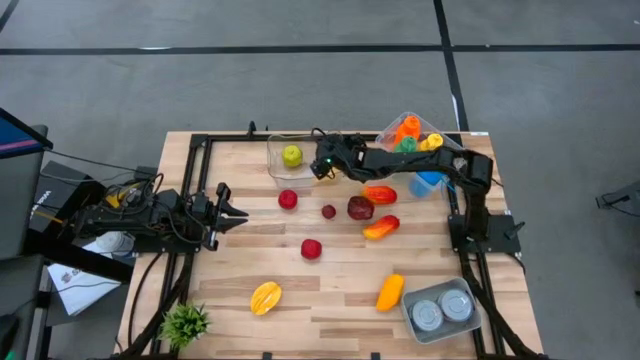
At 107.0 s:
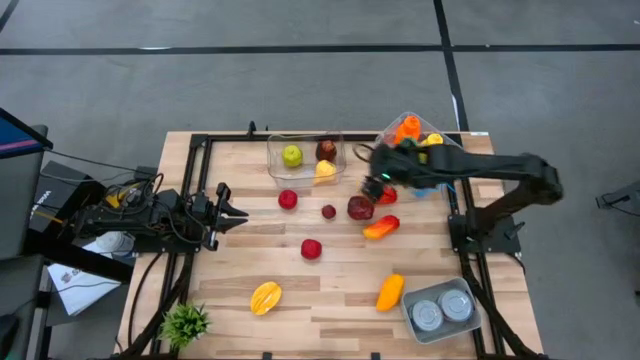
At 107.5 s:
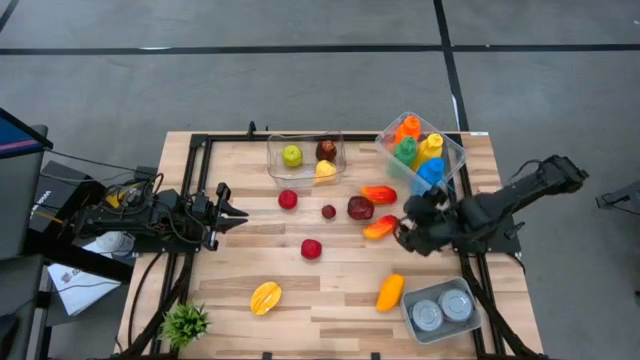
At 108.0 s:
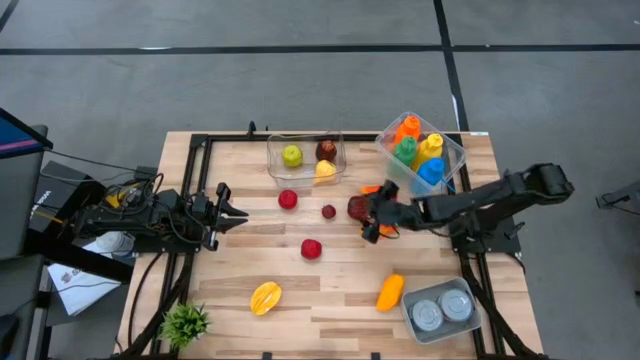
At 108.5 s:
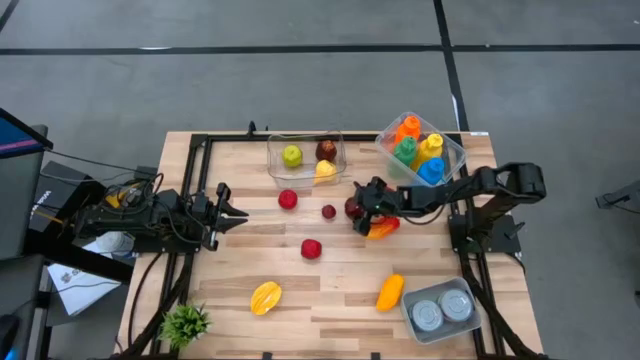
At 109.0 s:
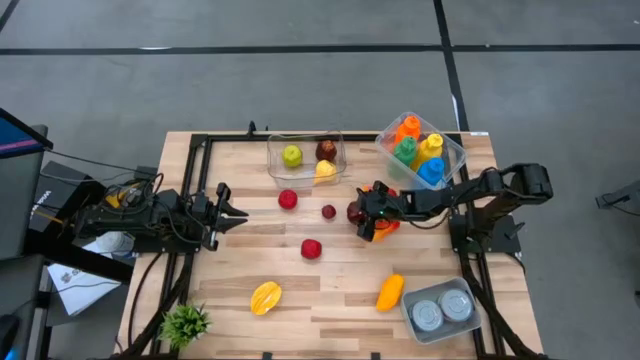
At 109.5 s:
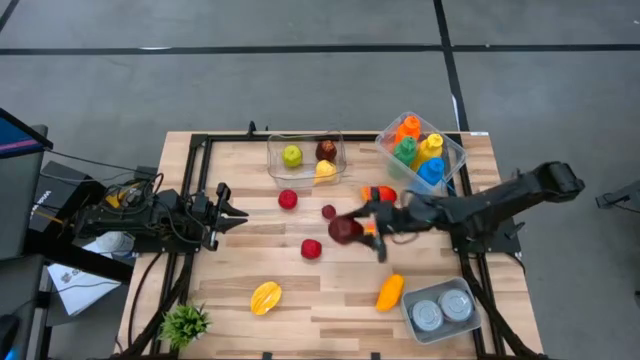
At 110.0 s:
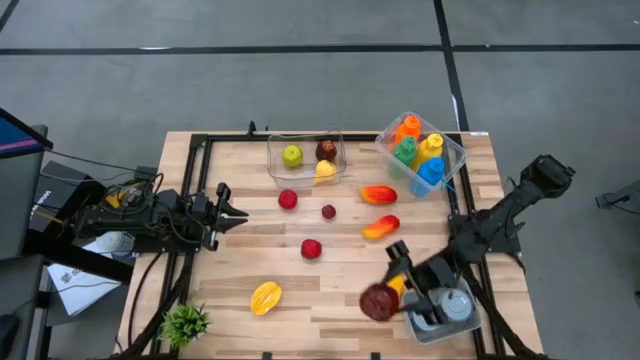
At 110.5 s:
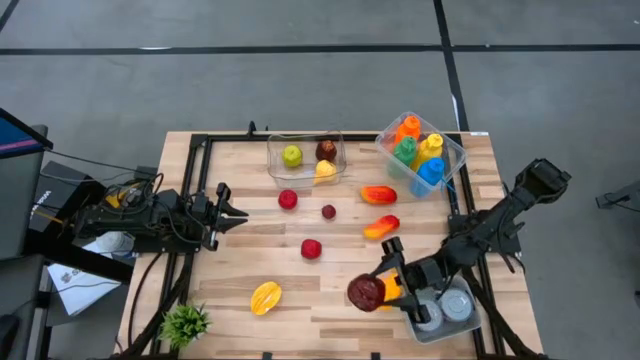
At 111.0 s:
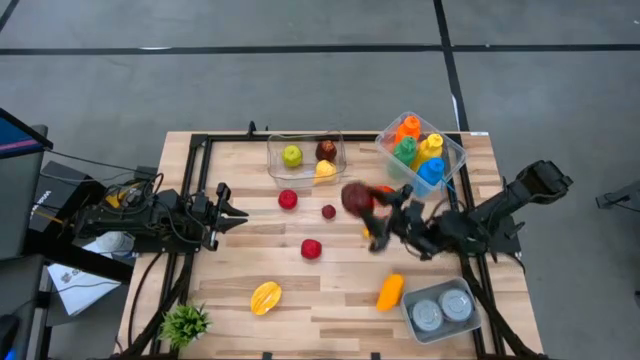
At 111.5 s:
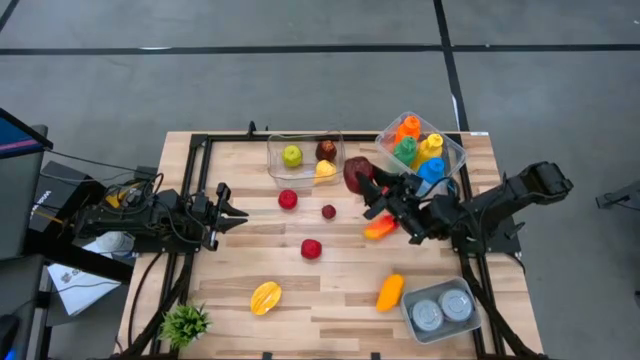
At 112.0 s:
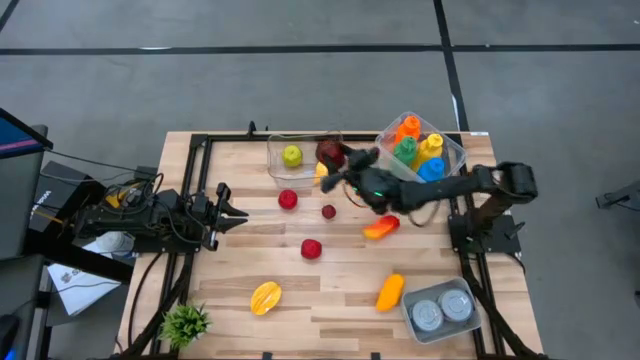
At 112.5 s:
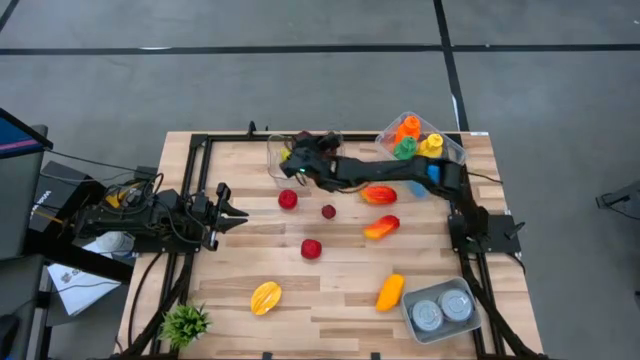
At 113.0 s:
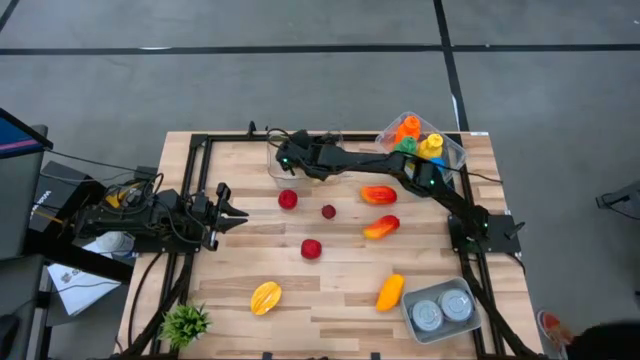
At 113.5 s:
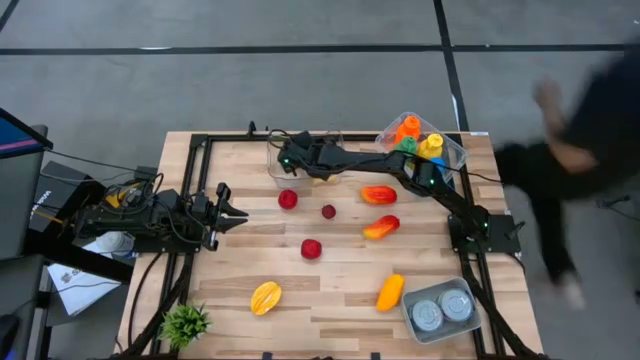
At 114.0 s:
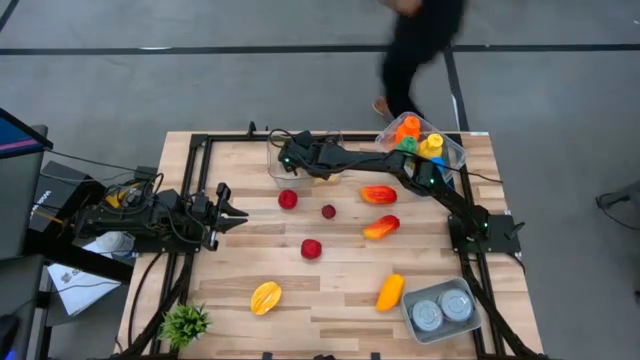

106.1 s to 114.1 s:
Task: Pick & Place Food Item
Put the red apple into the transparent bin

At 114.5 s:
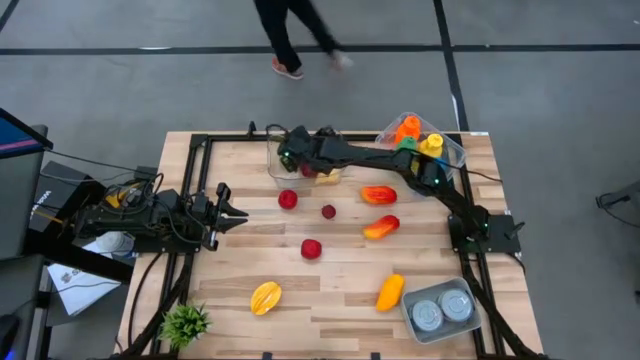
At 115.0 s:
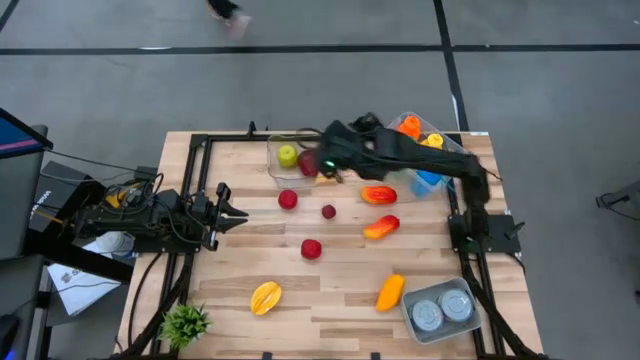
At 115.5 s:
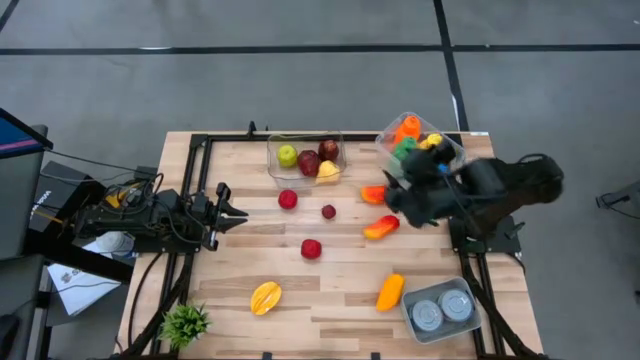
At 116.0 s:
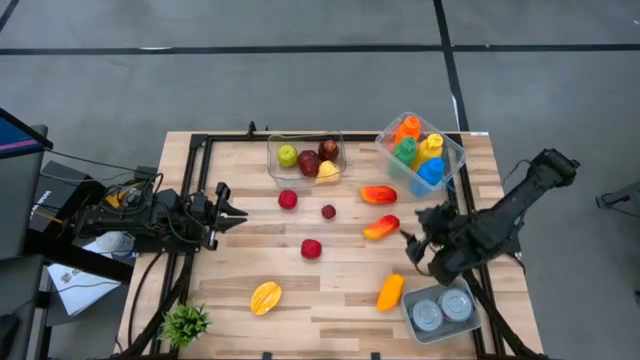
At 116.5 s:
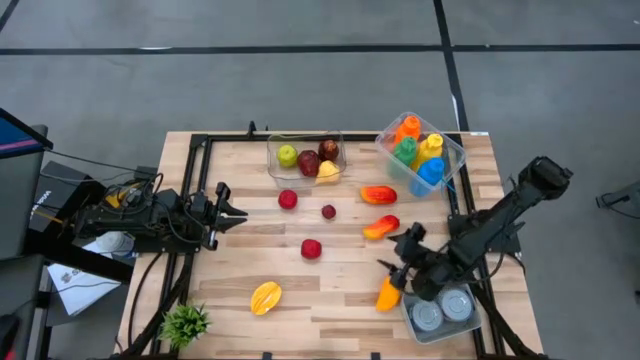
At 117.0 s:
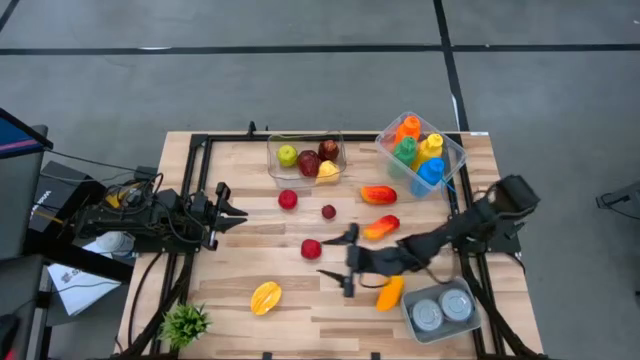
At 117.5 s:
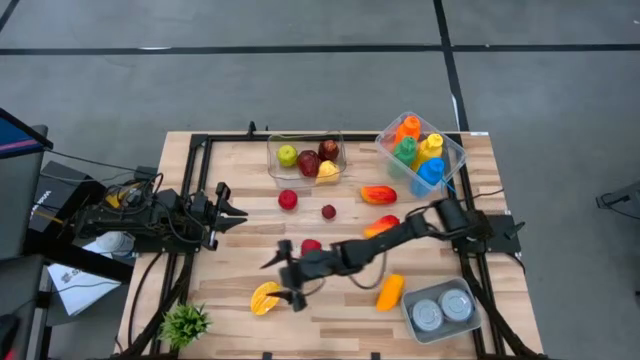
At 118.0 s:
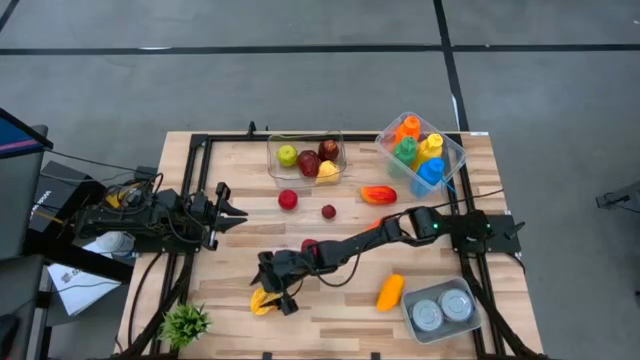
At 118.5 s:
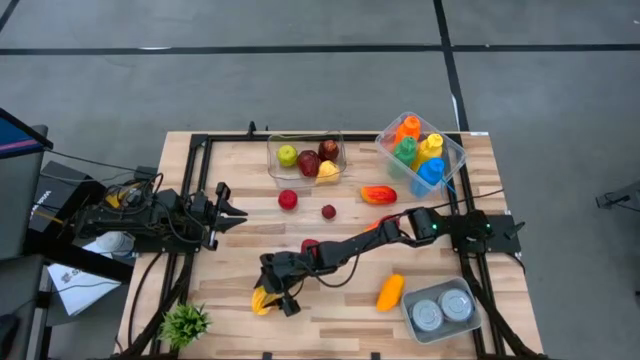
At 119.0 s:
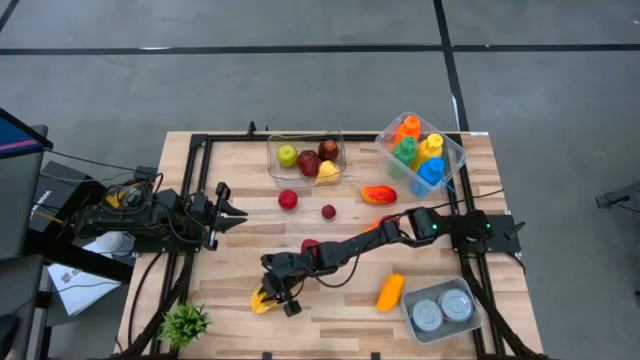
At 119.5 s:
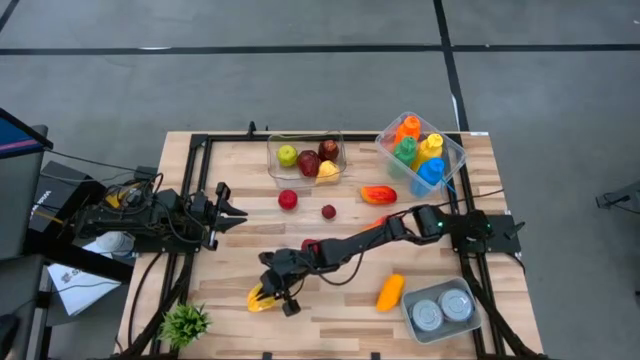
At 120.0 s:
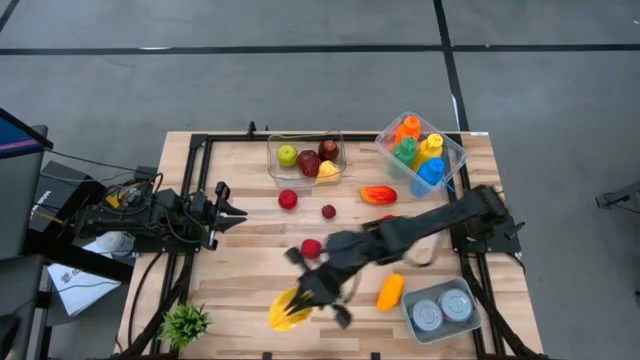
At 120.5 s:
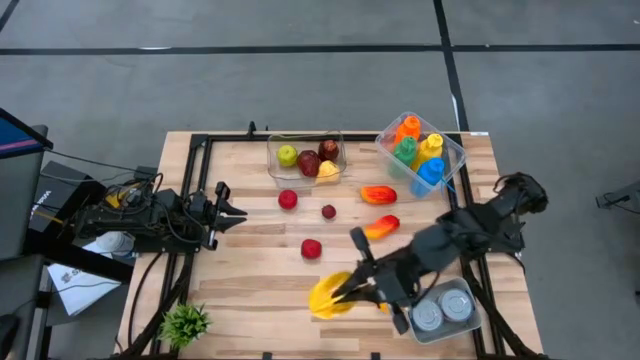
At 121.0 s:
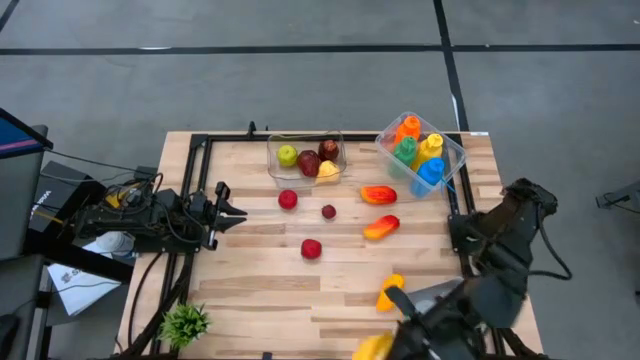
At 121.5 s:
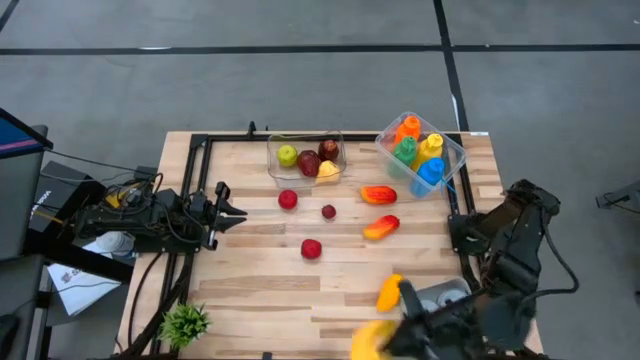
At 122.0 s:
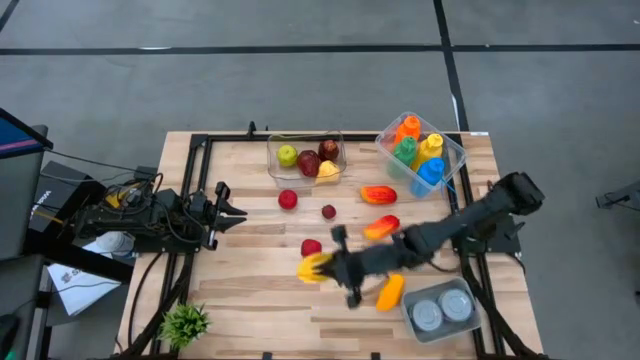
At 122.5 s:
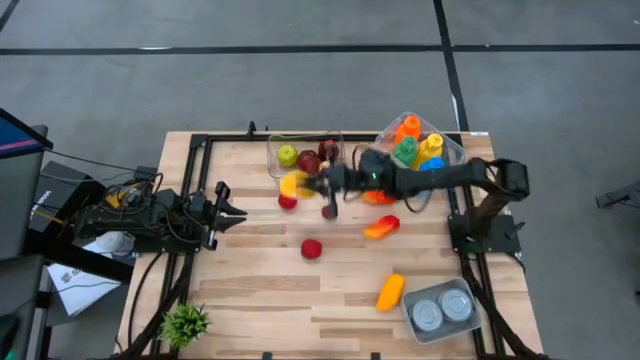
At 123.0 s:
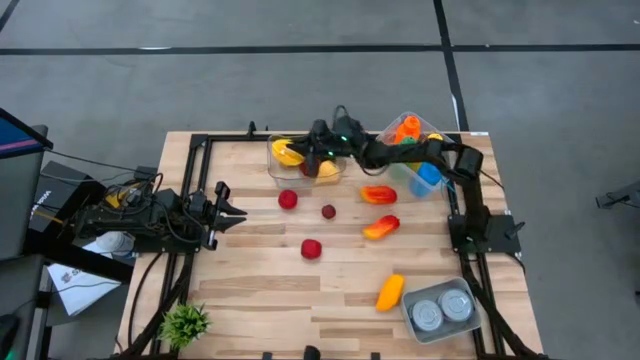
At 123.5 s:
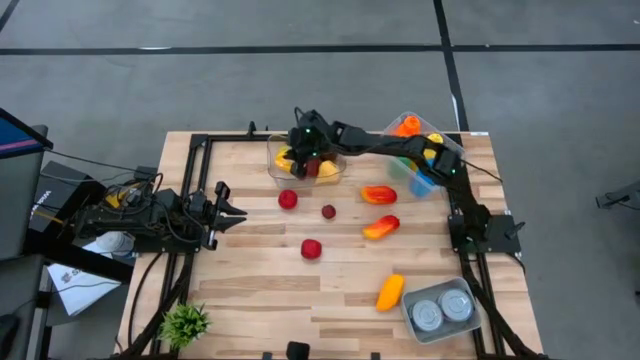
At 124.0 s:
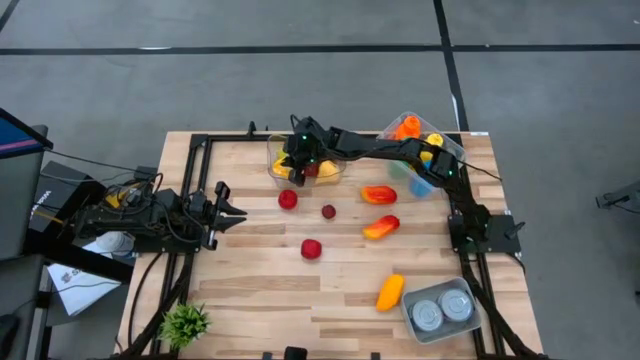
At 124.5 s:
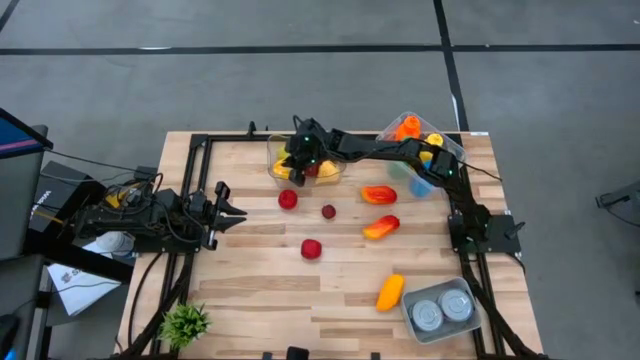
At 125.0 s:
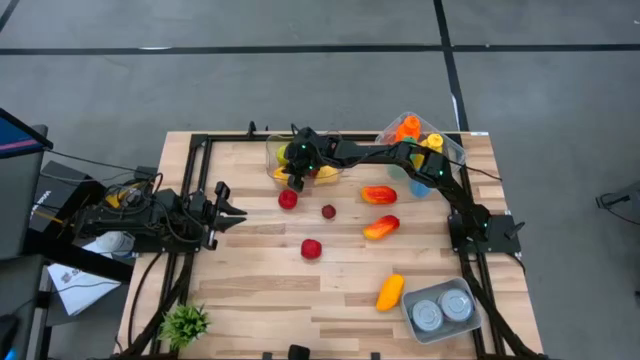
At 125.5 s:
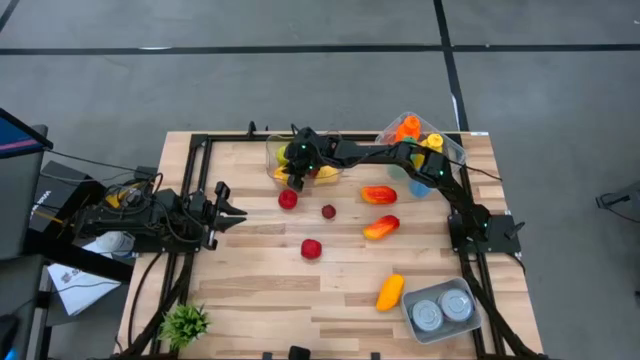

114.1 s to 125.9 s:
Put the yellow starfruit into the transparent bin
